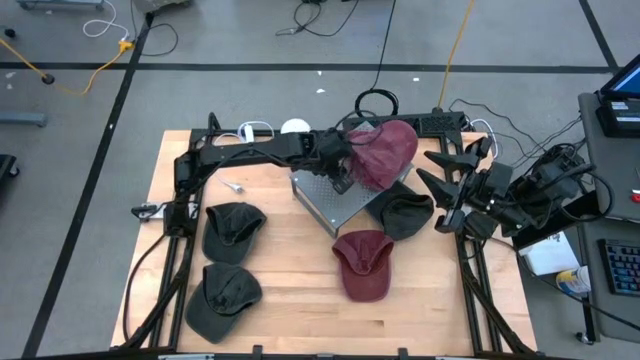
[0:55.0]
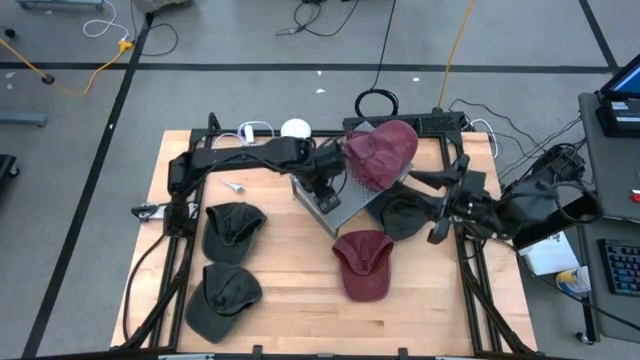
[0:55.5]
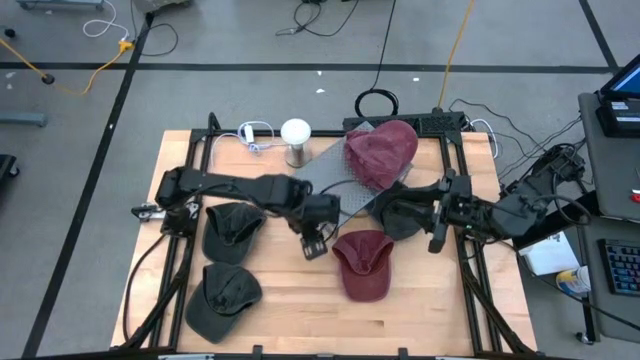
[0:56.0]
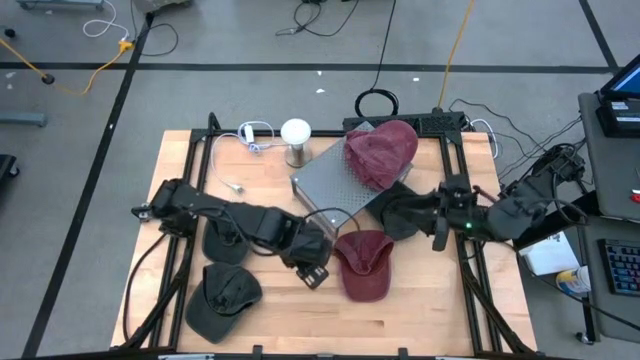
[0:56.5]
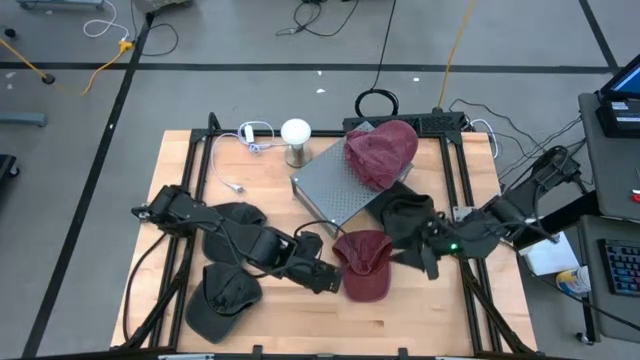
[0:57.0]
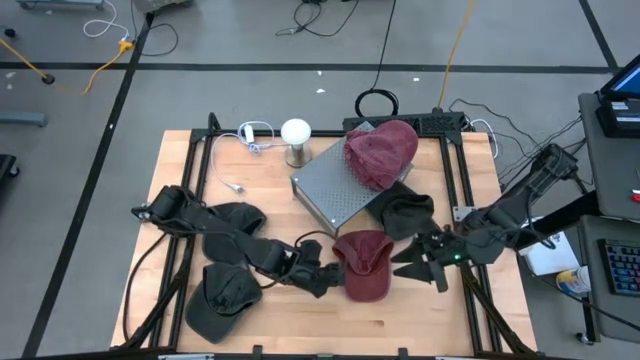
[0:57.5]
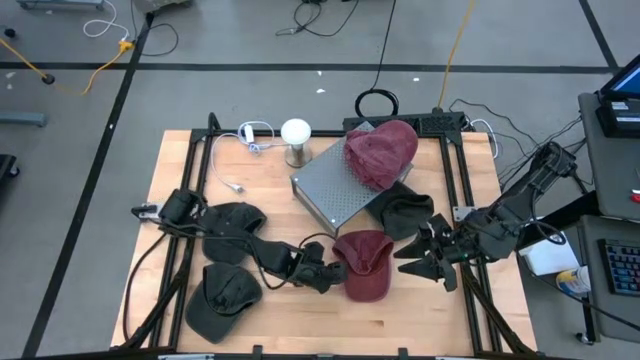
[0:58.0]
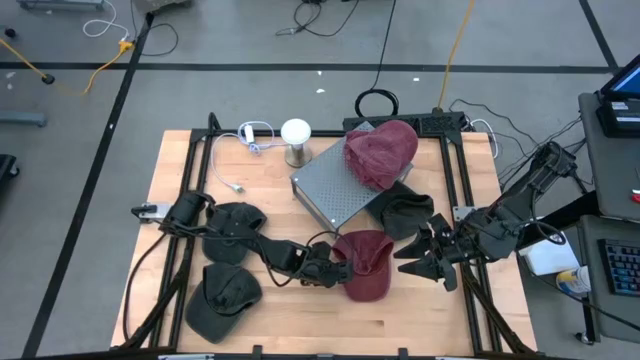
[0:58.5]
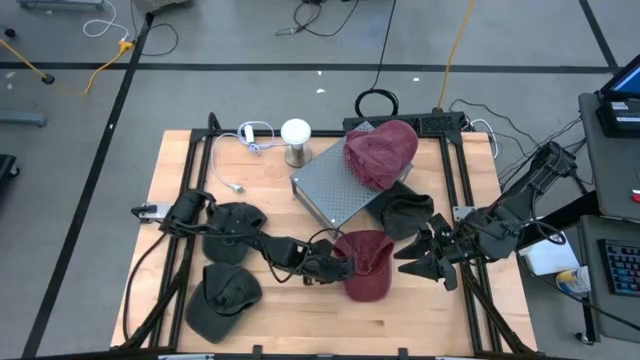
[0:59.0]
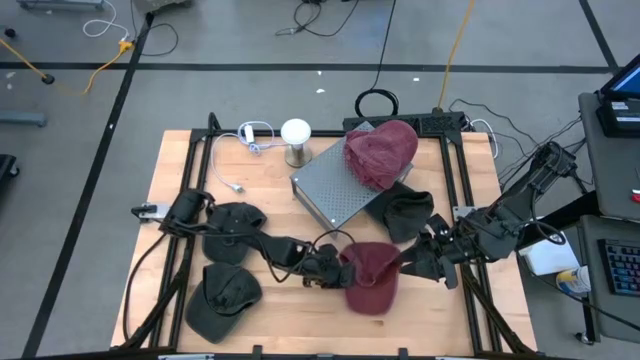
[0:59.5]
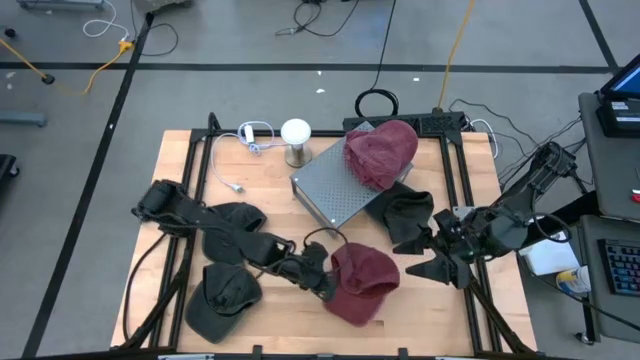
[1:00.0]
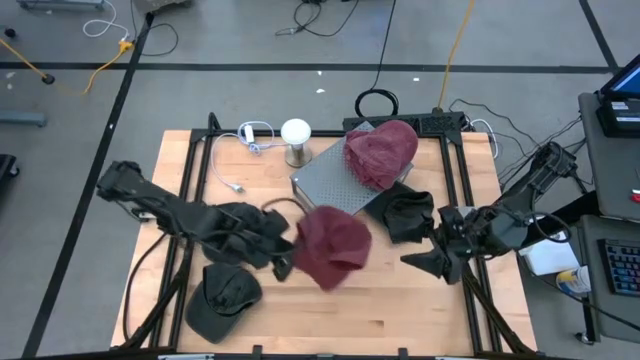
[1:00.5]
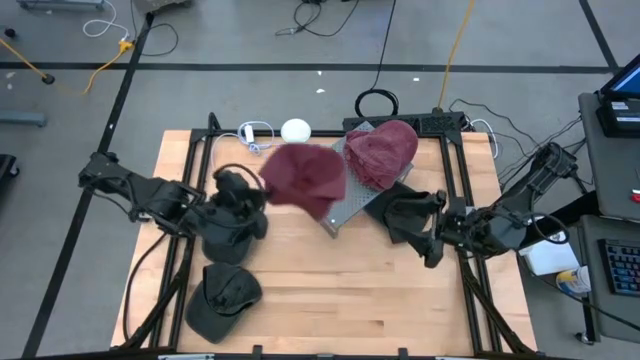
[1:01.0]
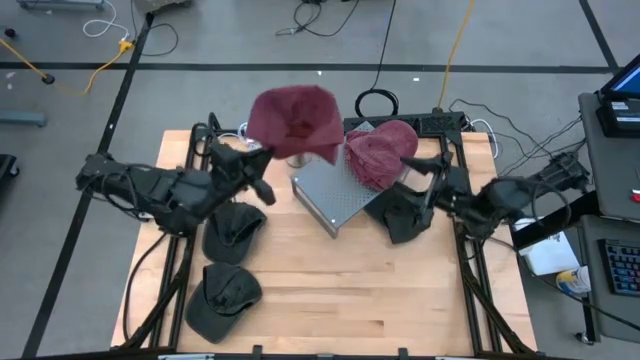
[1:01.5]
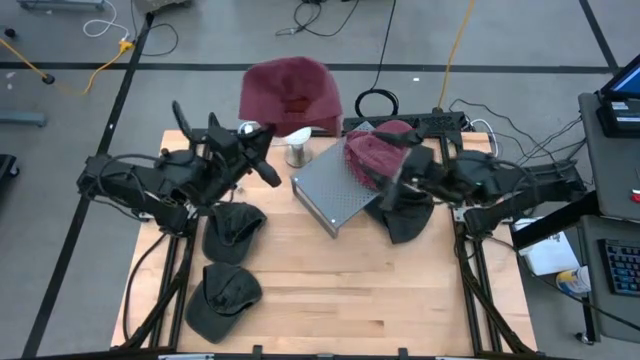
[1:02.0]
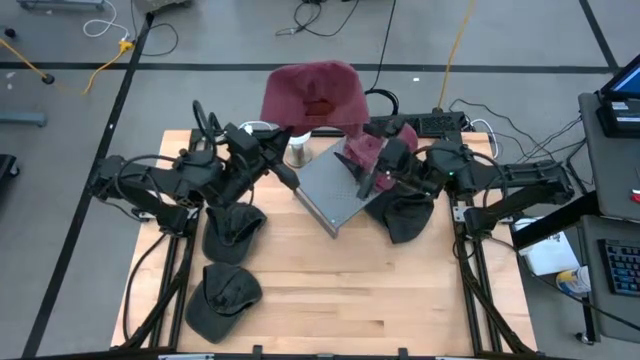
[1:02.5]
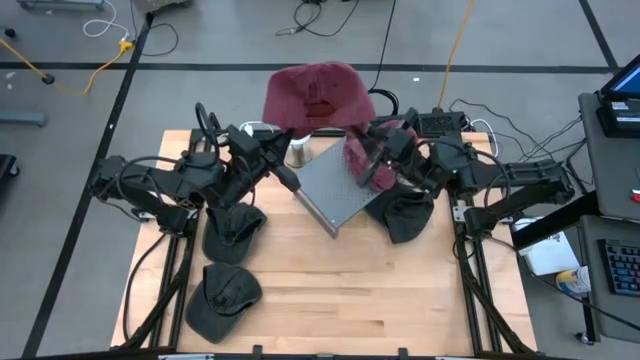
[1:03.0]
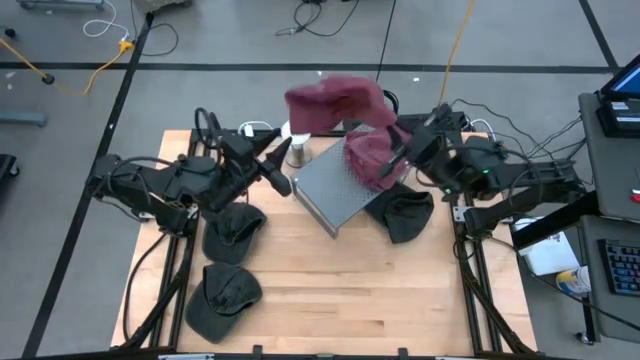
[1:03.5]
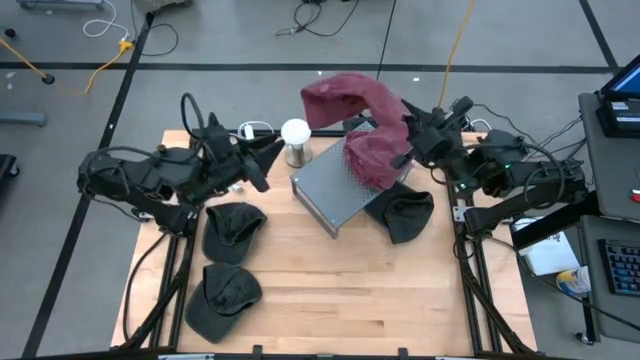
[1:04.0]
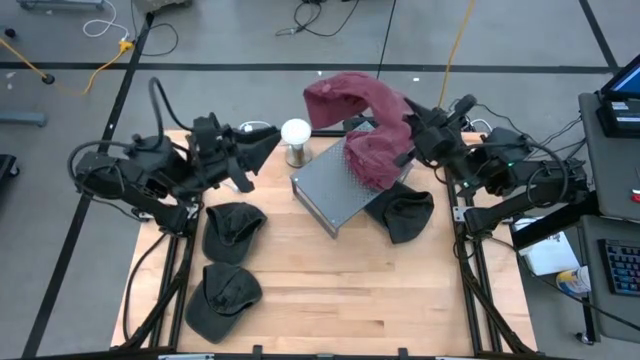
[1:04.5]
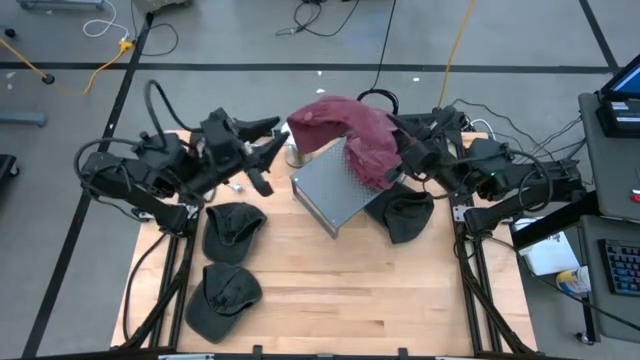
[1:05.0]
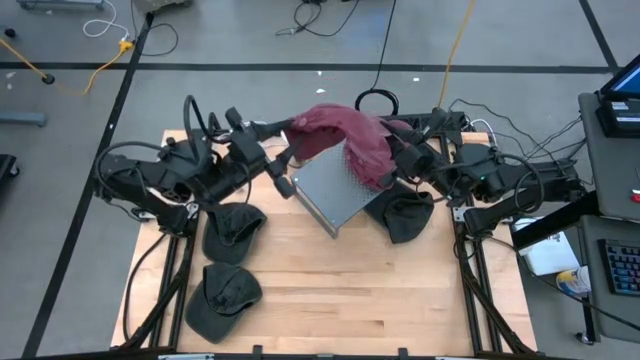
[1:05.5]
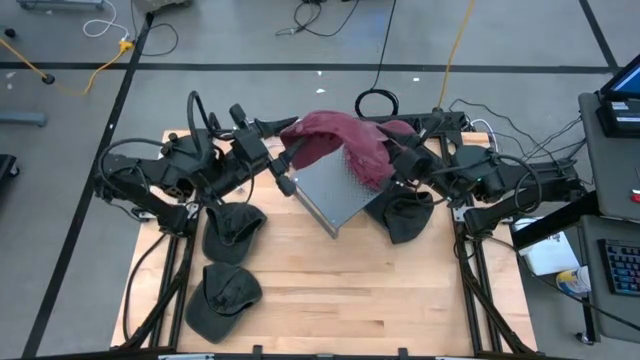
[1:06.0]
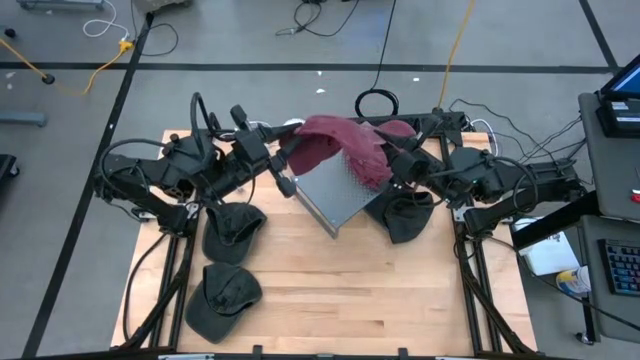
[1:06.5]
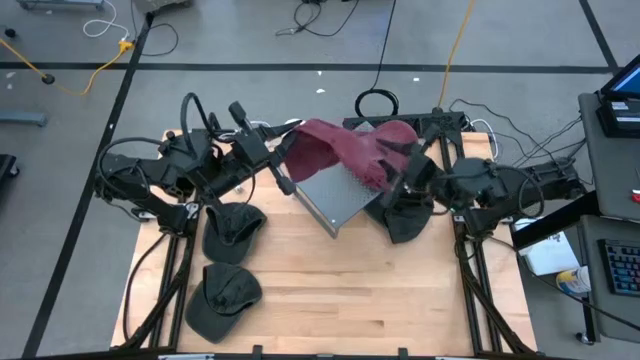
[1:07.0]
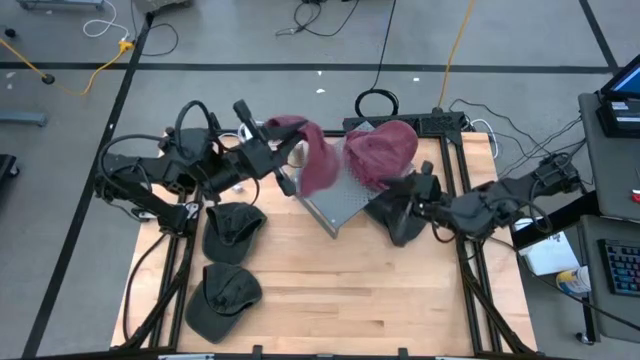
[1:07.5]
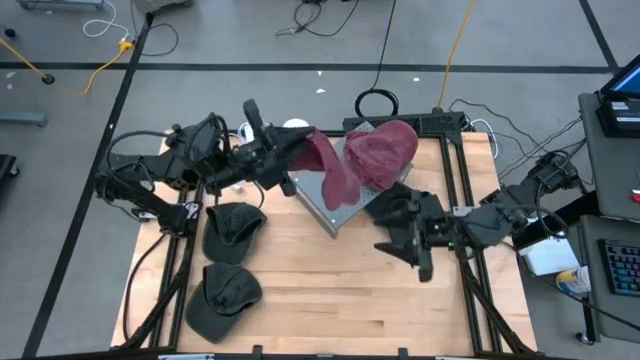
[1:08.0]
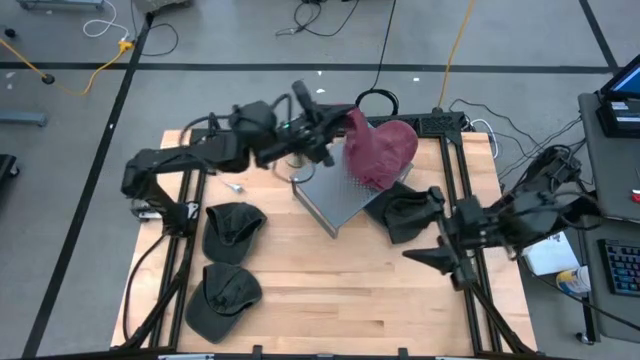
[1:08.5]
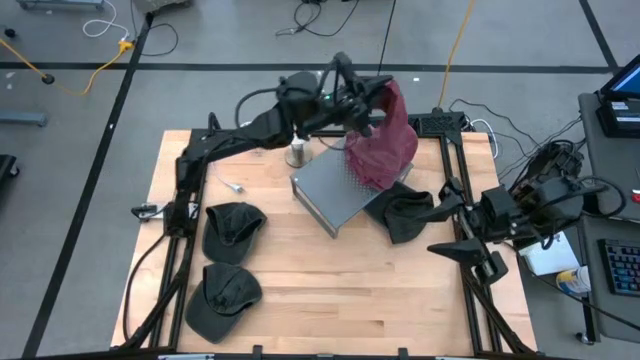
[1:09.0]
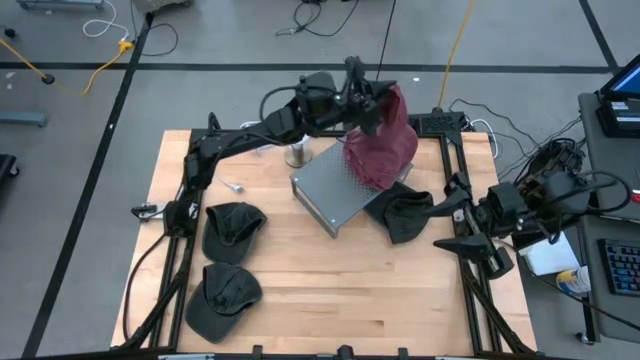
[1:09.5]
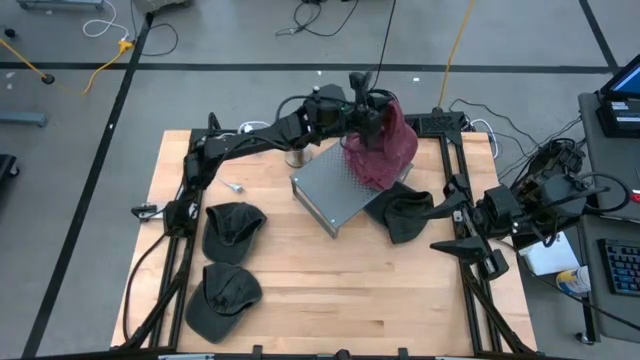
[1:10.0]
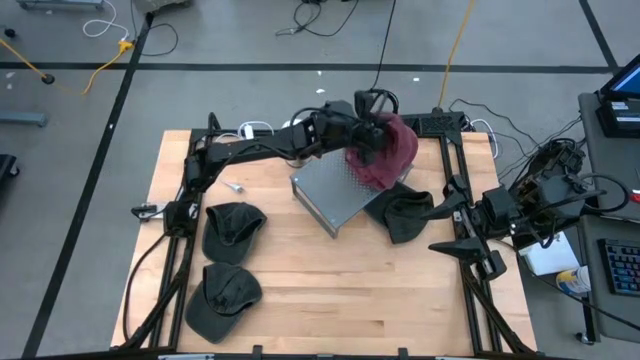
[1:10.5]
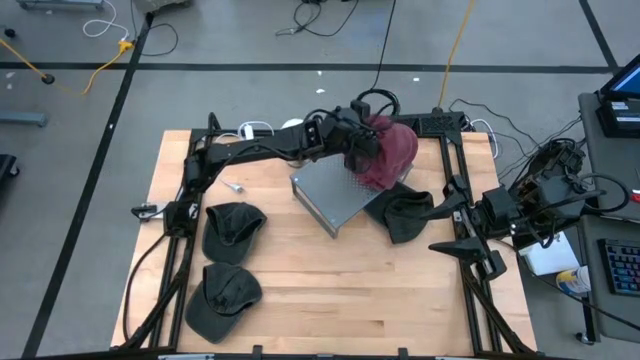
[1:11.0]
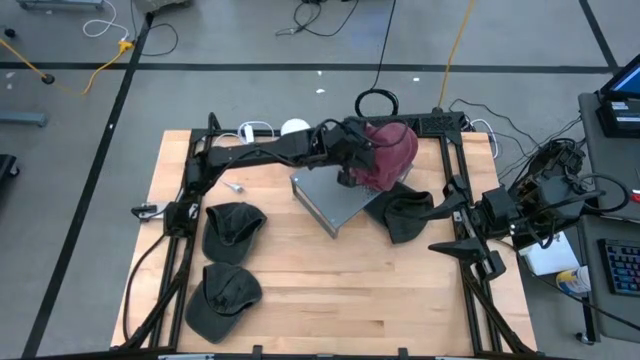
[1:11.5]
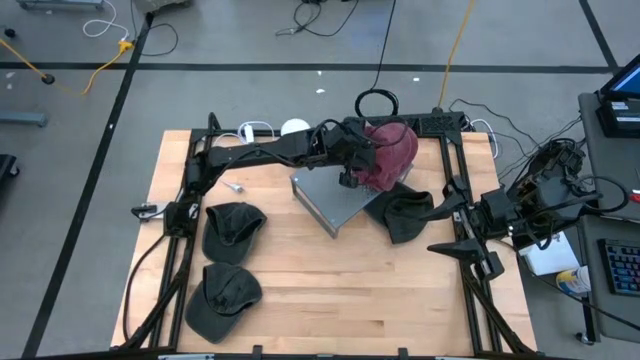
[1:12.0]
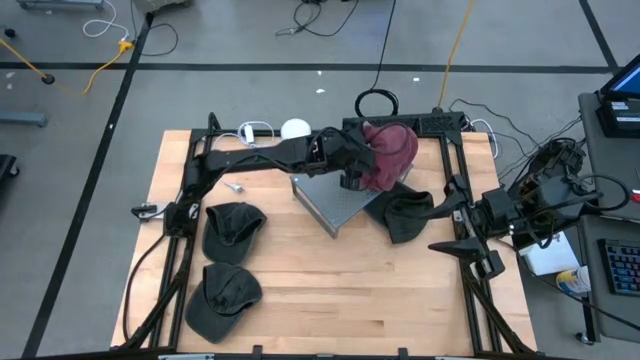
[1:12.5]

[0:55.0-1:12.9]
Task: Pick & Place hat
Stack the red cap on top of the red cap on the shelf
